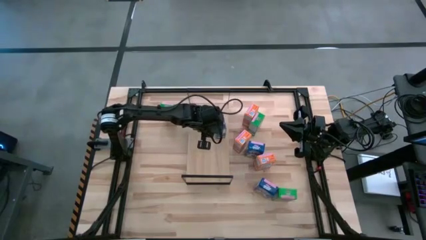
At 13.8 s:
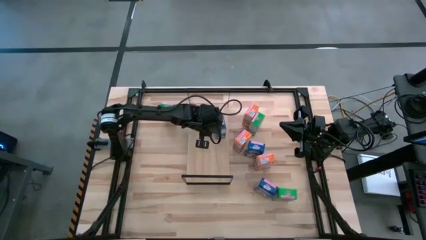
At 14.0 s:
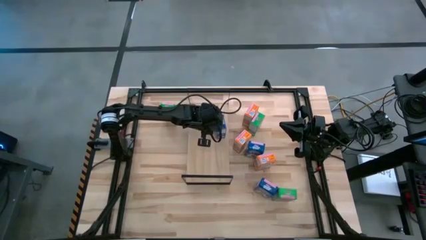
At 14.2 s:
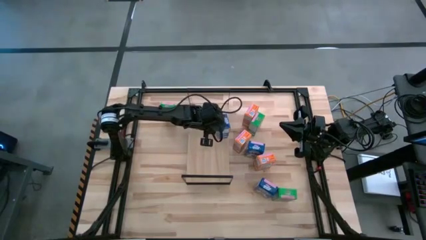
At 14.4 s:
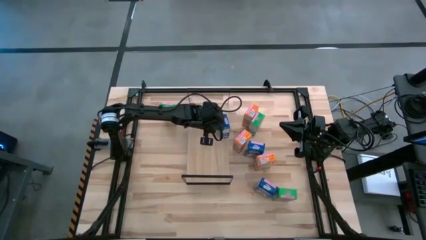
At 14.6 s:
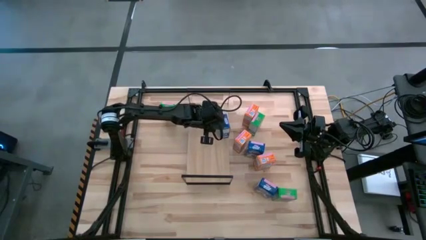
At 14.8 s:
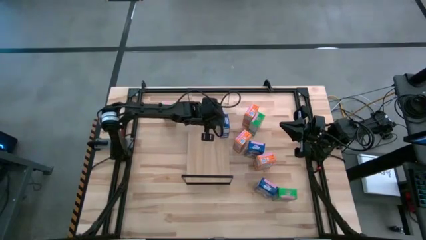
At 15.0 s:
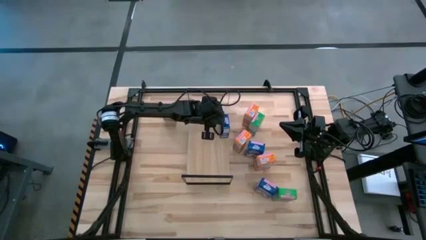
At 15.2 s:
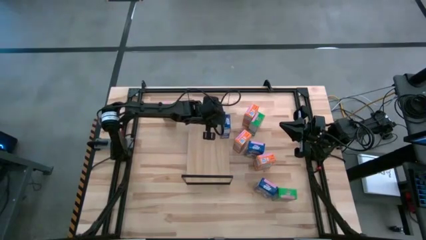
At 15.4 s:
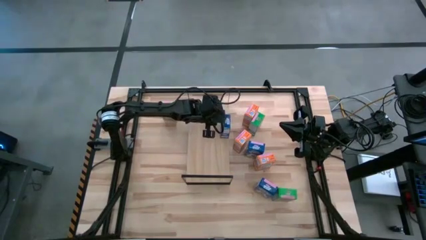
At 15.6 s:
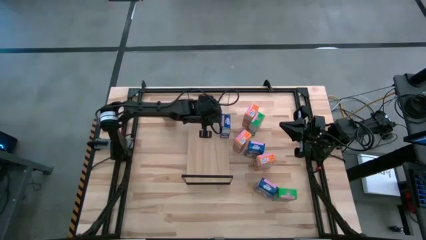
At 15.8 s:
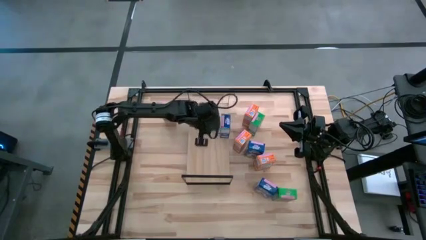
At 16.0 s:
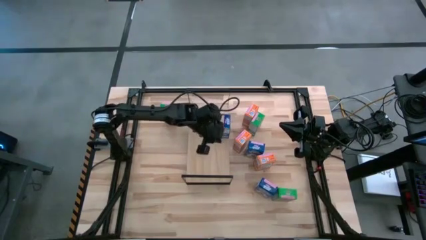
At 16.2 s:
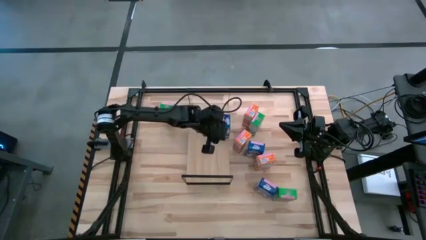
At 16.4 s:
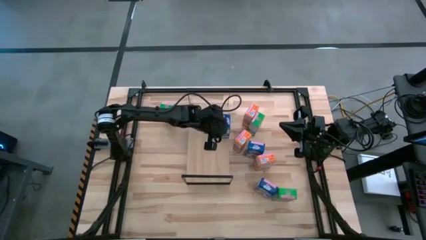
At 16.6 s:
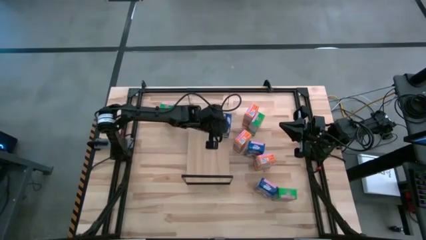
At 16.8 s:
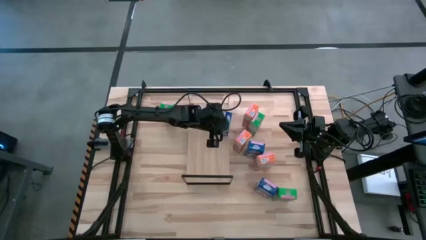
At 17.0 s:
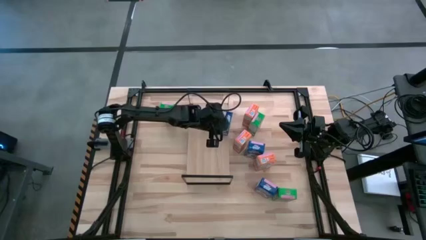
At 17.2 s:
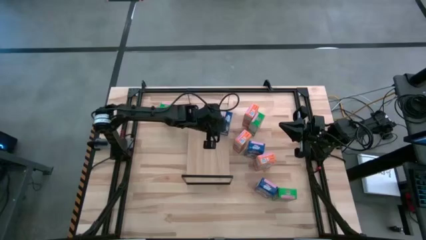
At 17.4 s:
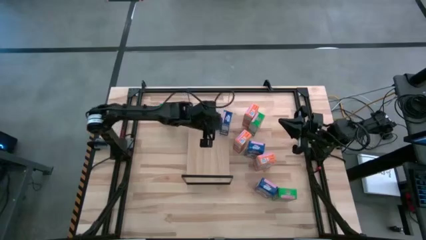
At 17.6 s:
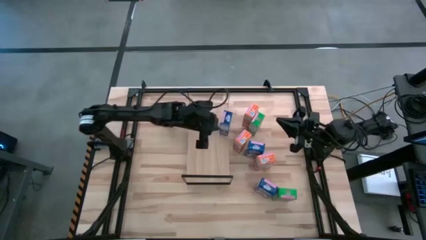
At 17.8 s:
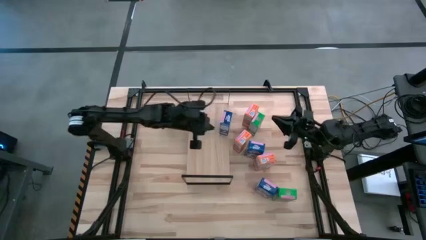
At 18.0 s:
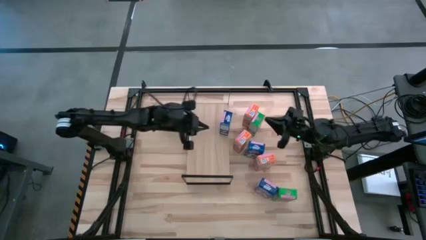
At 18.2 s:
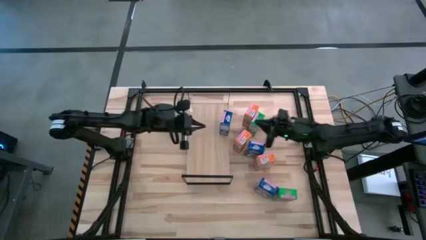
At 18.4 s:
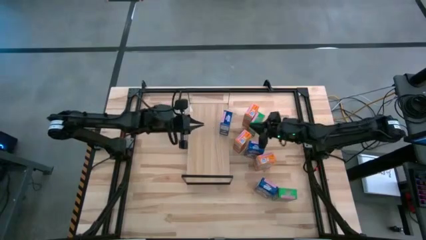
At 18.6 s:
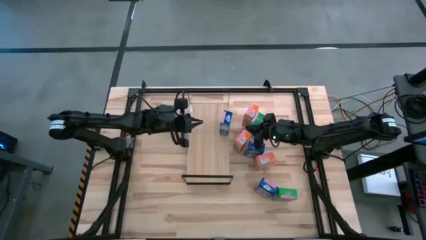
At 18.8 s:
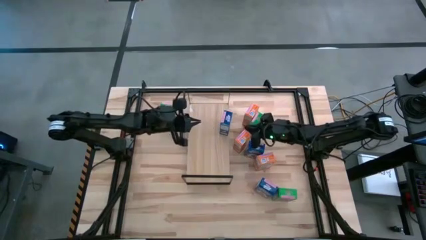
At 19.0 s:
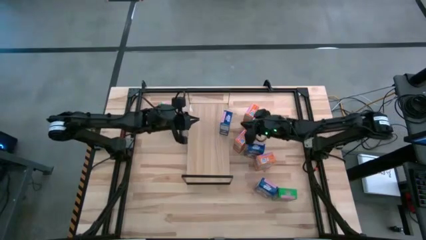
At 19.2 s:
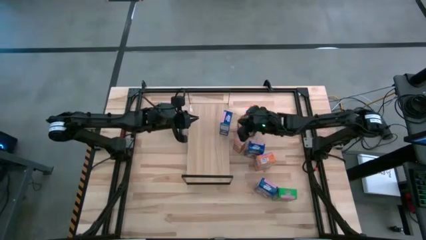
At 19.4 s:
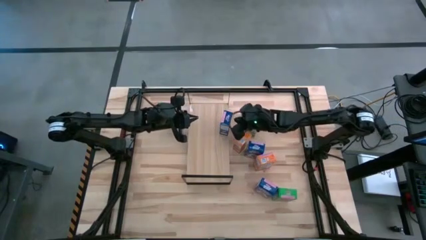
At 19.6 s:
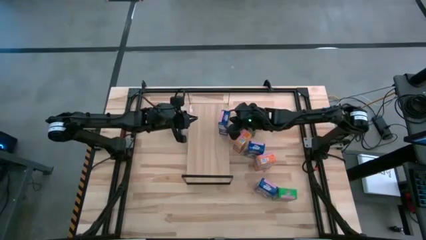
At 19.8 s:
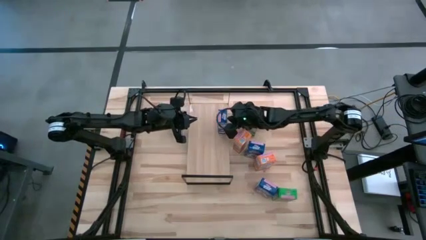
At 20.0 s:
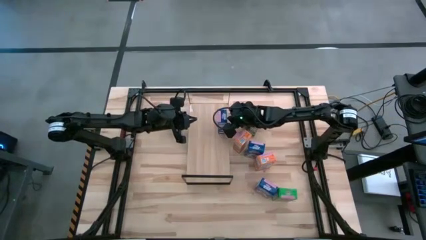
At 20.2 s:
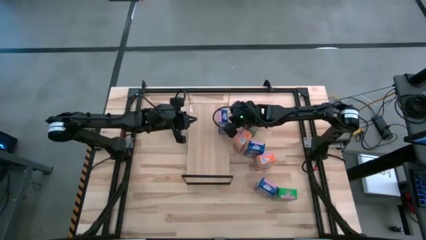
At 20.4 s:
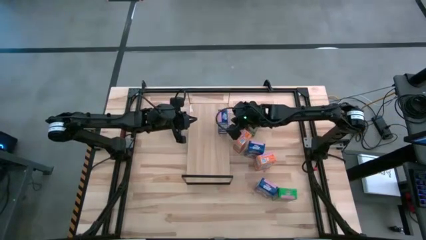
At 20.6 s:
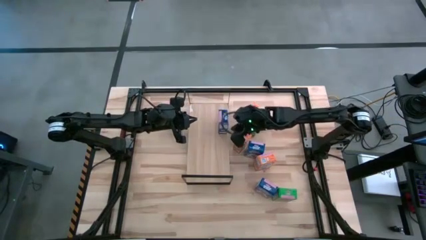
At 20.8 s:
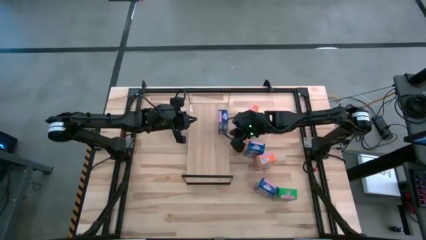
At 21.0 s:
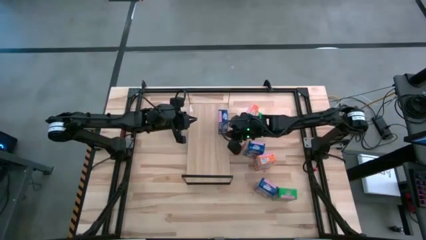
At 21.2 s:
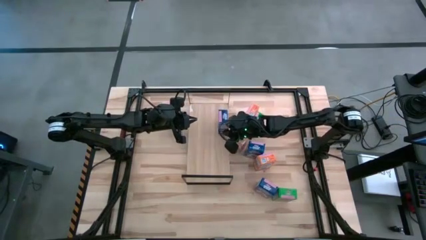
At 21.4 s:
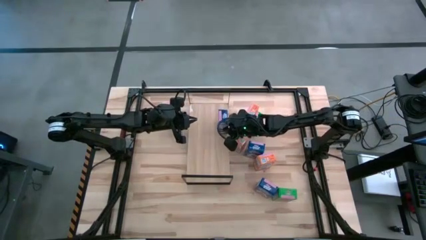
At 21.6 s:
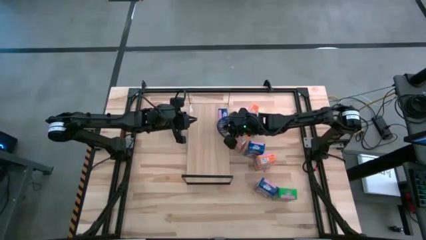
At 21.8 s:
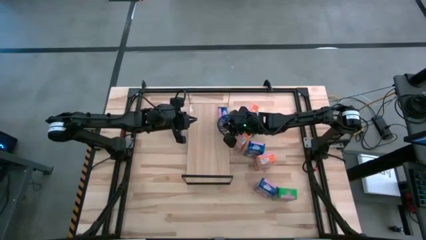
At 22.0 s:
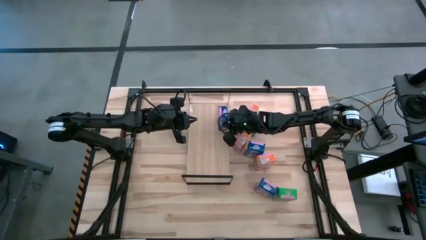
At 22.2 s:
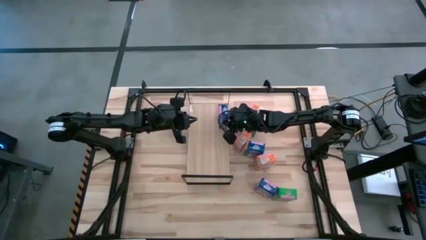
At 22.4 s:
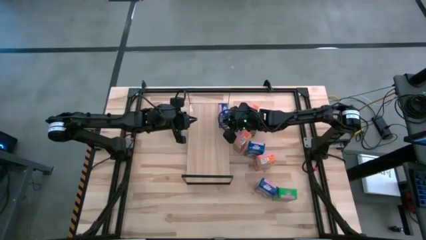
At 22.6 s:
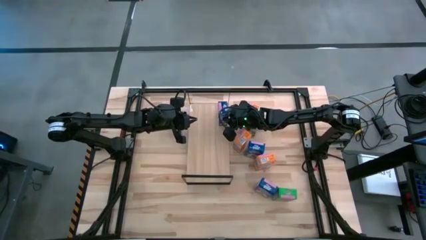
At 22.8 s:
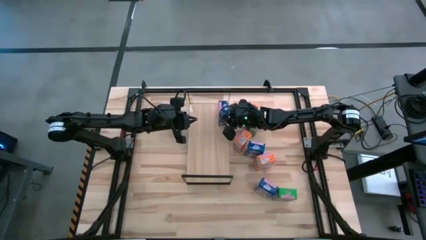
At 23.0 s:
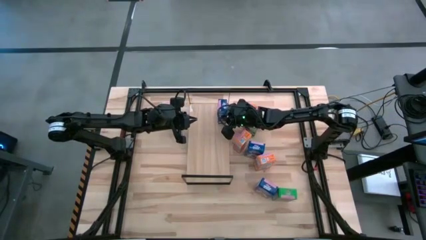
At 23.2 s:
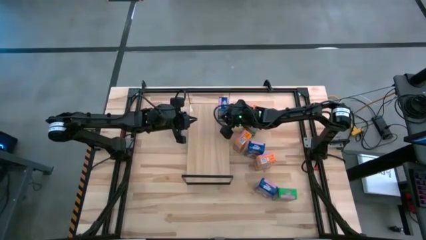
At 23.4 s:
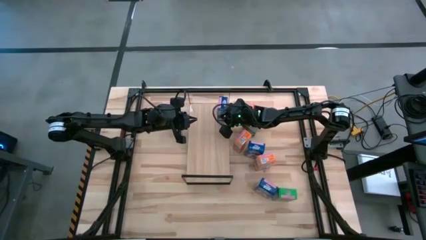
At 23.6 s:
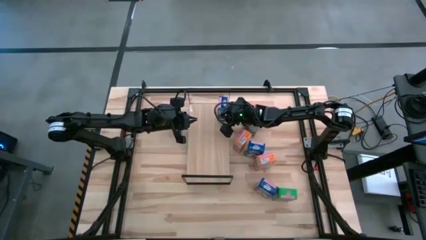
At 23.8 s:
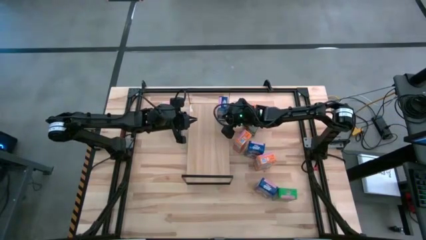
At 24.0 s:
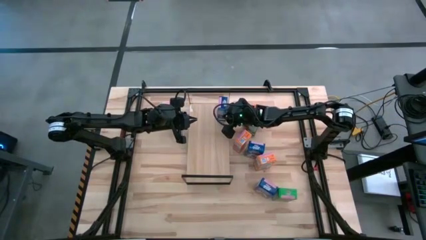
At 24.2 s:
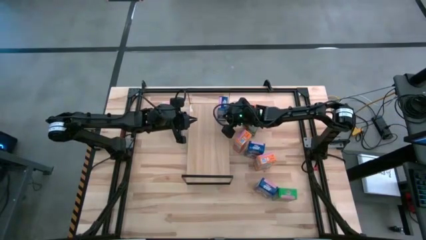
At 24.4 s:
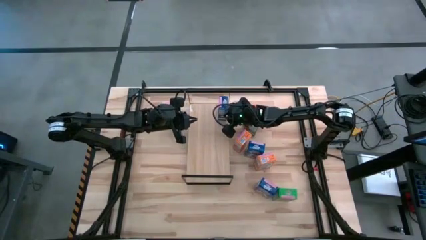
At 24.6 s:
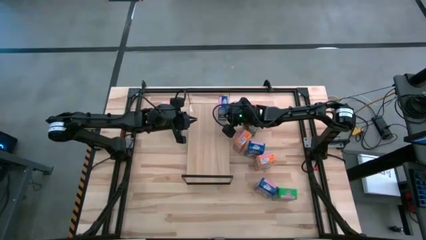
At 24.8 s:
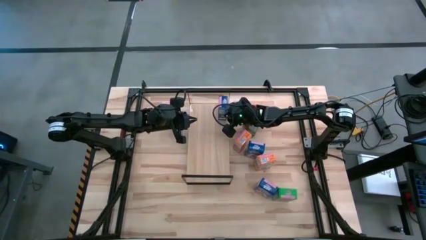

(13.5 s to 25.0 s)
Task: Stack cereal on shelf
Put the bottom left blue cereal box on the shelf

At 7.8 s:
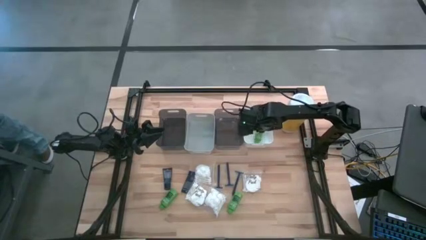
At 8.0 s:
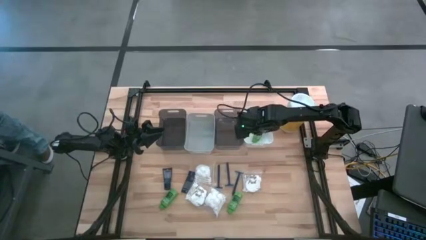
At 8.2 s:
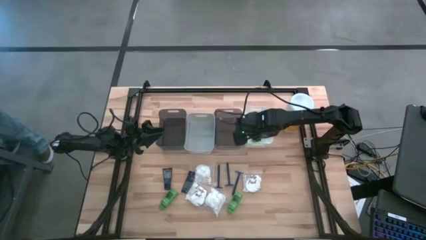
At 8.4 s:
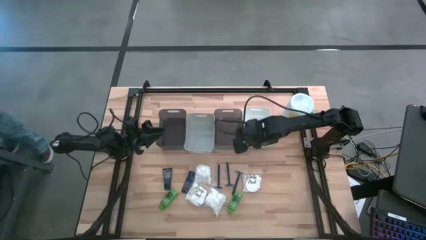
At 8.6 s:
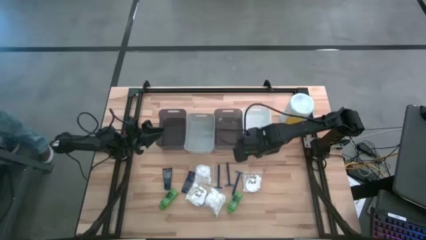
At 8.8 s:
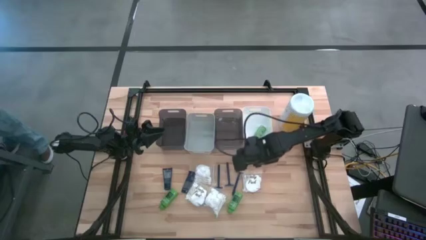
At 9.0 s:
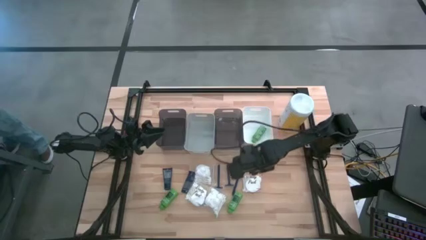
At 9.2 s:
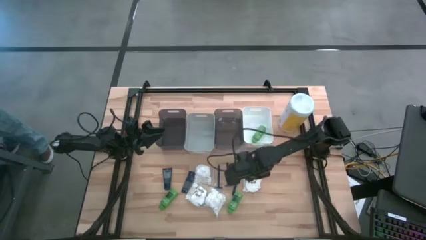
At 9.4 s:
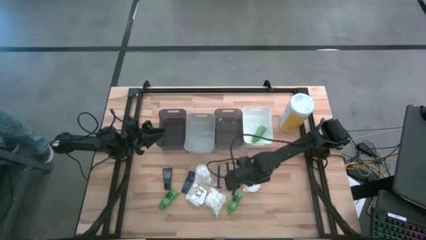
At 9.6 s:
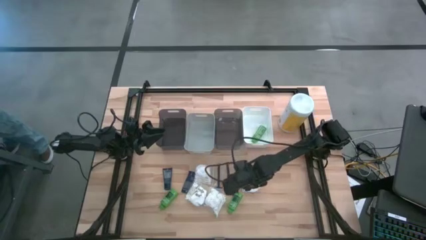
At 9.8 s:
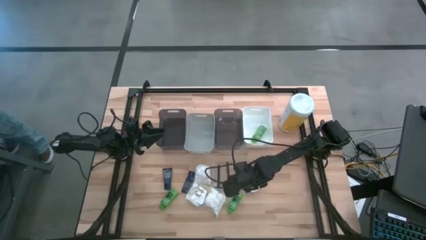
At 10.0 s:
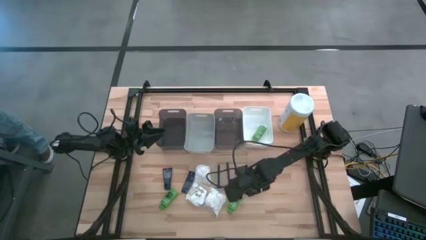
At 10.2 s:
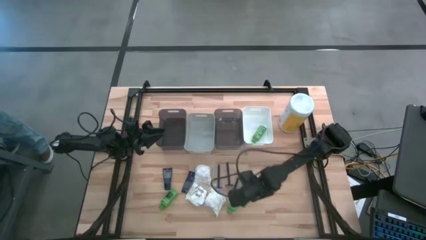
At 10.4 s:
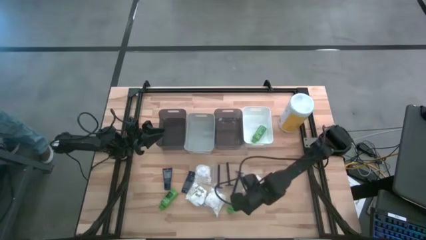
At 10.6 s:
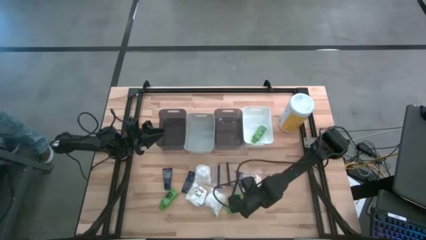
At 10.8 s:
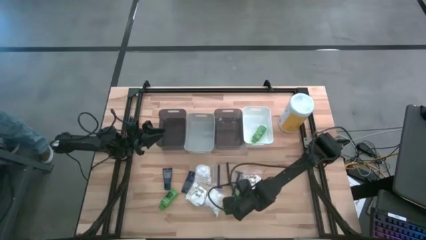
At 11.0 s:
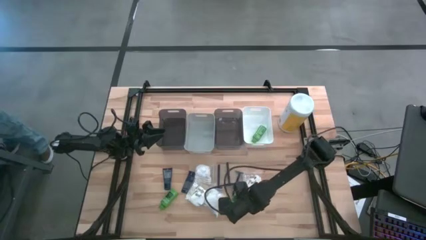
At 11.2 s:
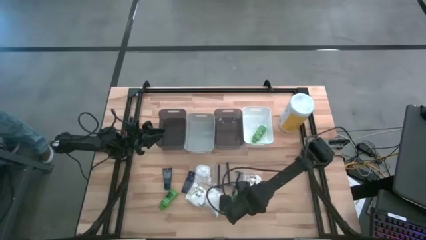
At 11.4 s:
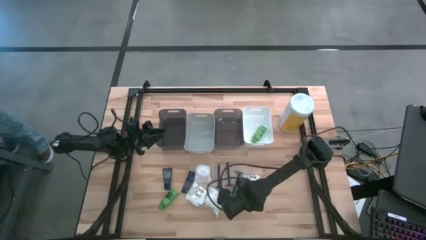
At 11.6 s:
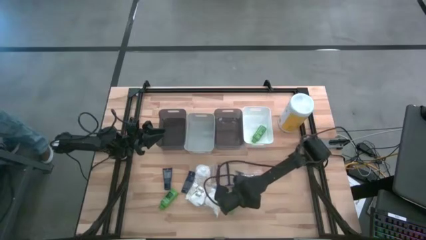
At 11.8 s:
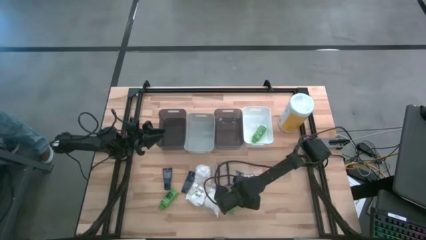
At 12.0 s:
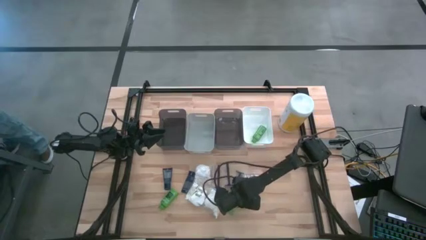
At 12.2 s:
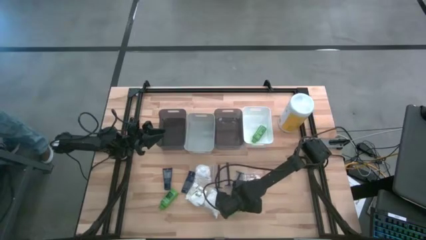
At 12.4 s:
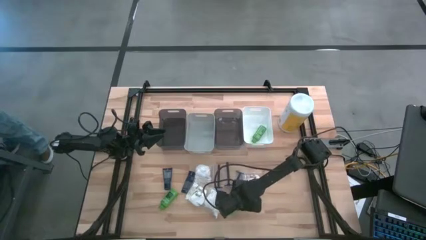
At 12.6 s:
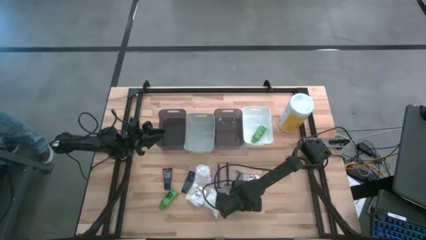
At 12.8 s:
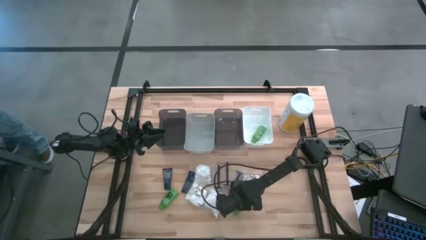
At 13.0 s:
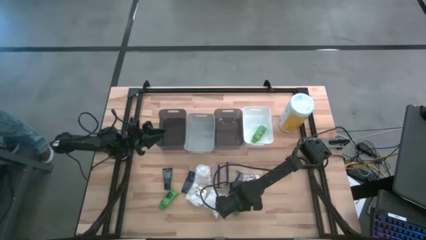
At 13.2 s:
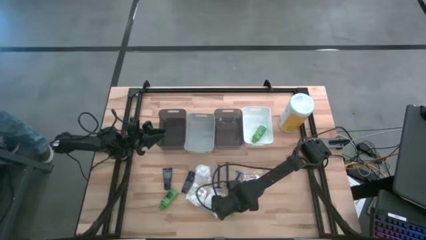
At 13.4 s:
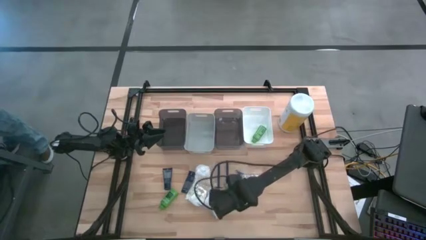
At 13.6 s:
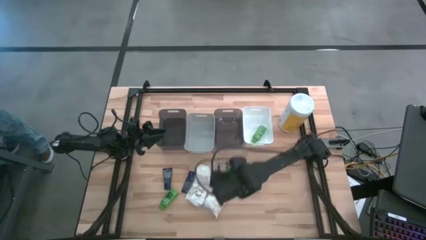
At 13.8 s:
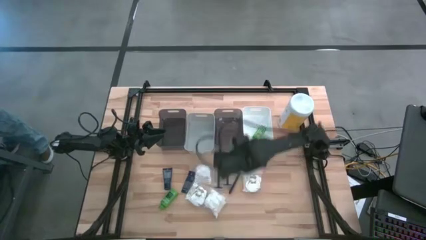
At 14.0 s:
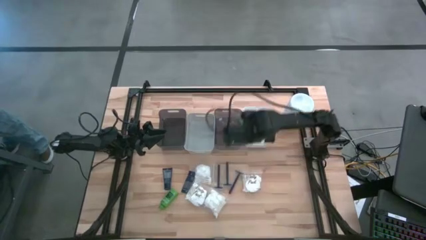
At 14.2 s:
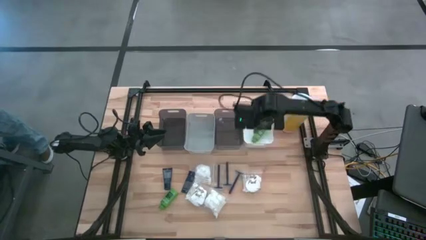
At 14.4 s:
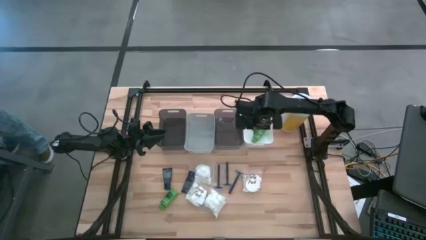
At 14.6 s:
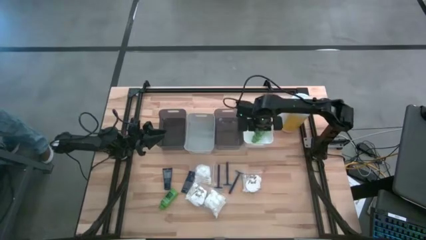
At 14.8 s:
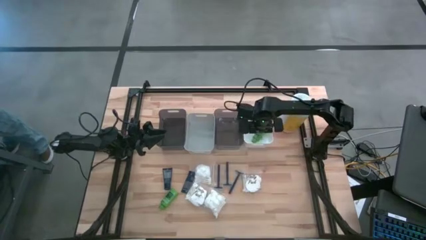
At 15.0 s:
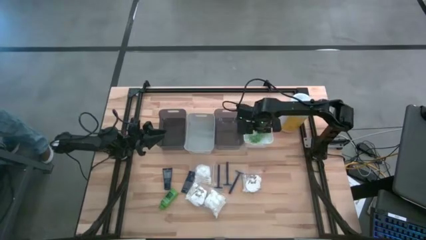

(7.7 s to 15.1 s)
Task: Pick & Place Travel size toiletries
Put the green shampoo into the white bin
